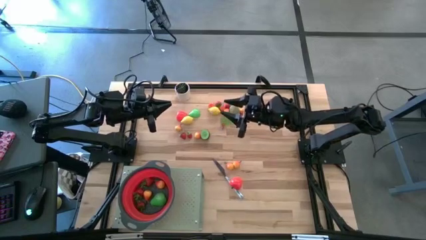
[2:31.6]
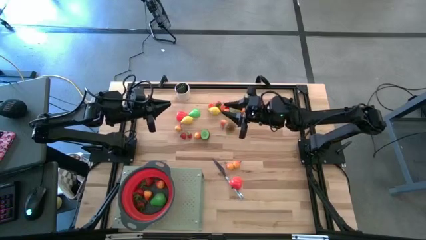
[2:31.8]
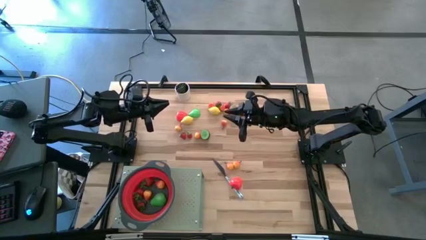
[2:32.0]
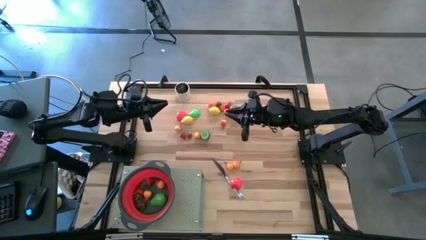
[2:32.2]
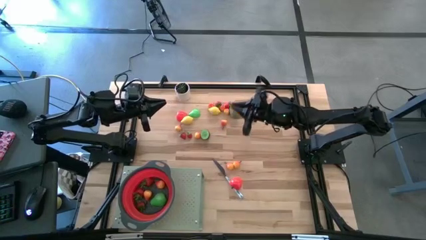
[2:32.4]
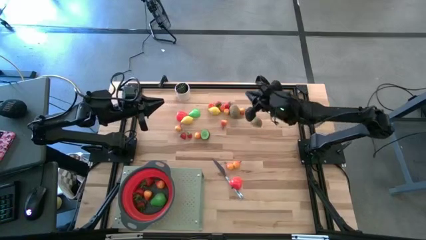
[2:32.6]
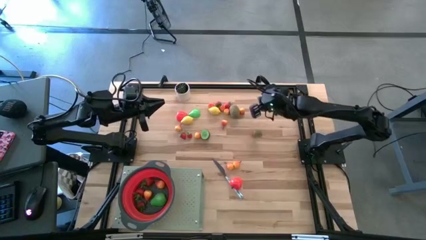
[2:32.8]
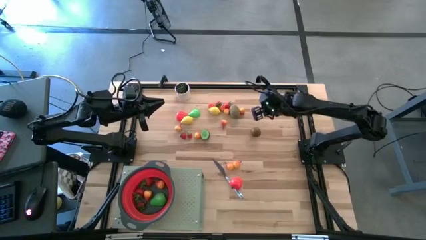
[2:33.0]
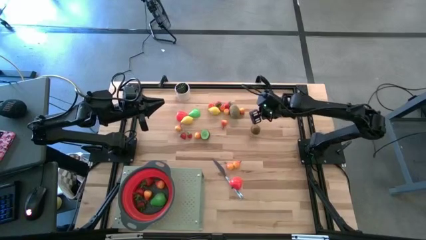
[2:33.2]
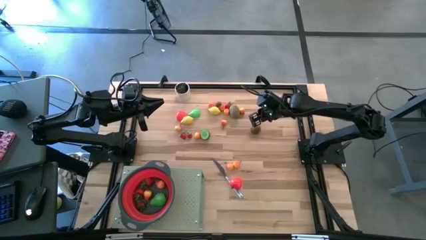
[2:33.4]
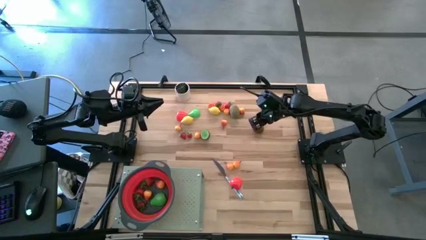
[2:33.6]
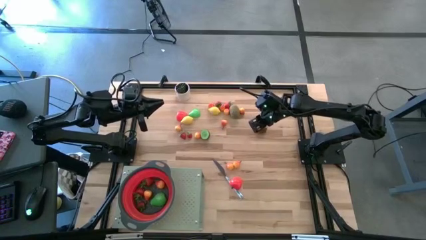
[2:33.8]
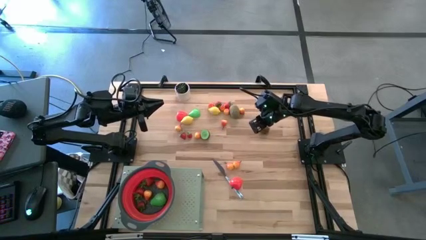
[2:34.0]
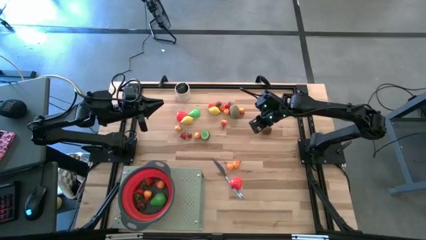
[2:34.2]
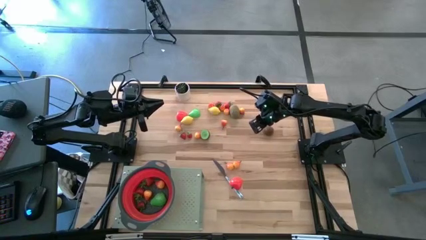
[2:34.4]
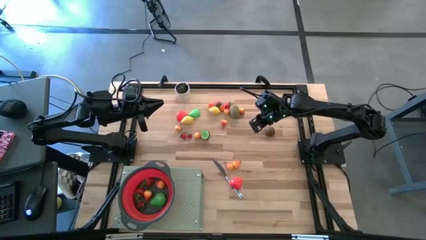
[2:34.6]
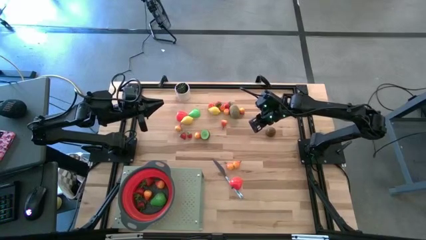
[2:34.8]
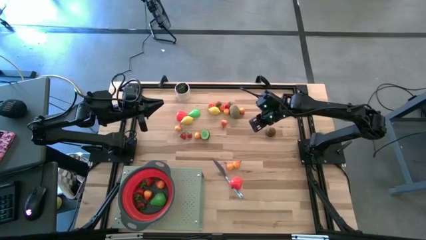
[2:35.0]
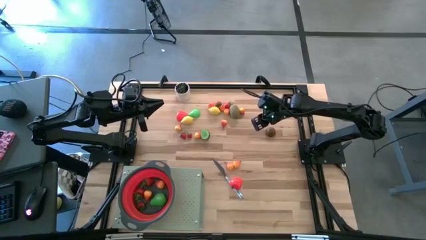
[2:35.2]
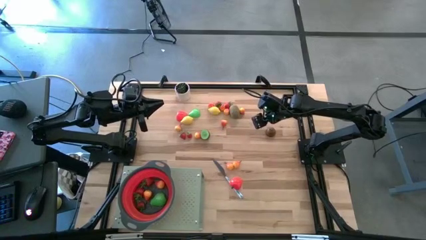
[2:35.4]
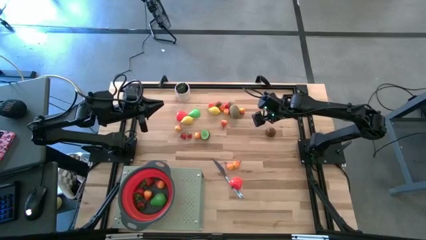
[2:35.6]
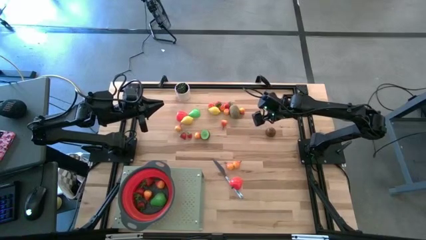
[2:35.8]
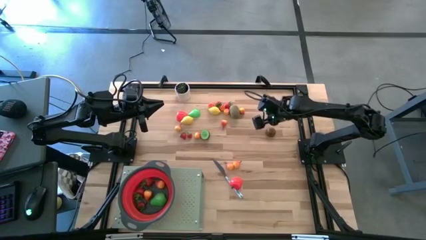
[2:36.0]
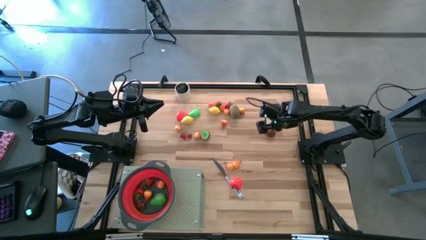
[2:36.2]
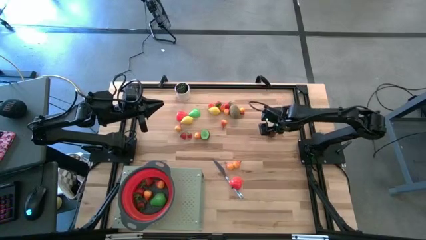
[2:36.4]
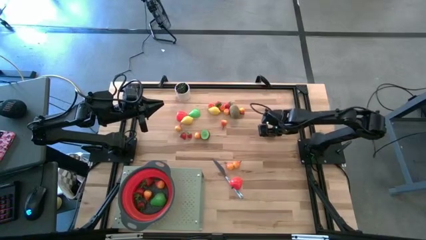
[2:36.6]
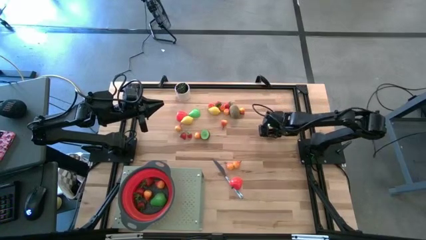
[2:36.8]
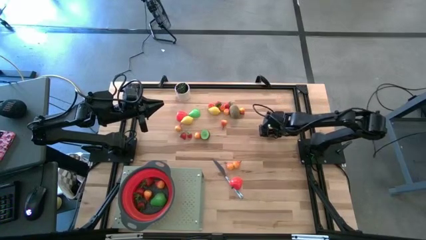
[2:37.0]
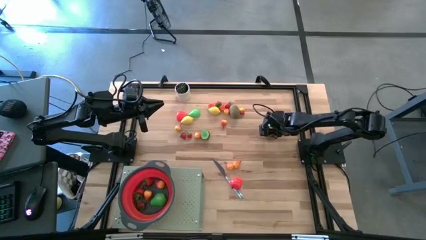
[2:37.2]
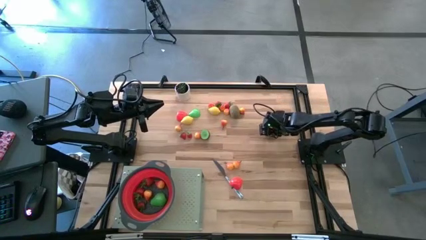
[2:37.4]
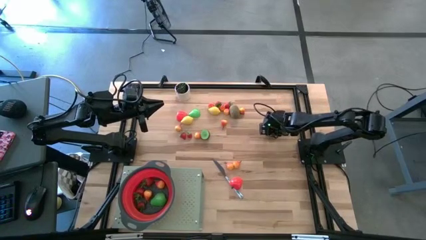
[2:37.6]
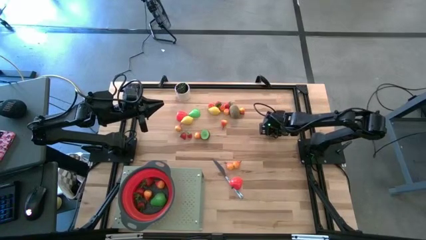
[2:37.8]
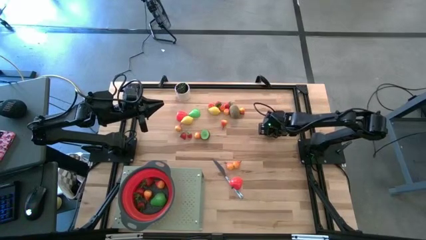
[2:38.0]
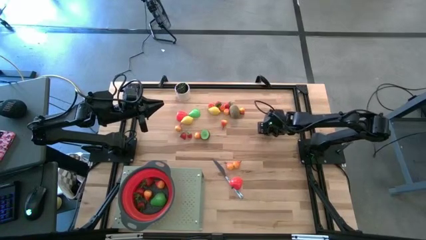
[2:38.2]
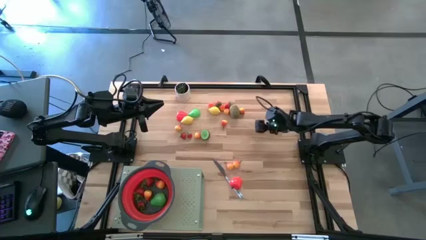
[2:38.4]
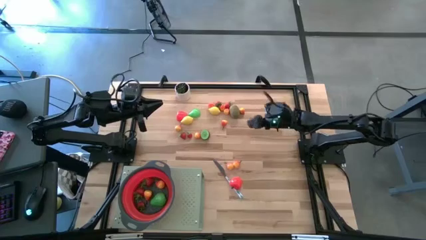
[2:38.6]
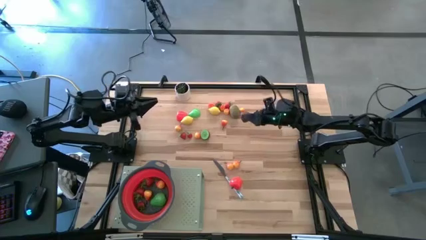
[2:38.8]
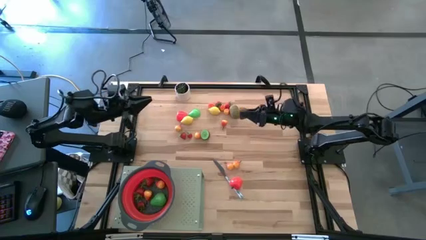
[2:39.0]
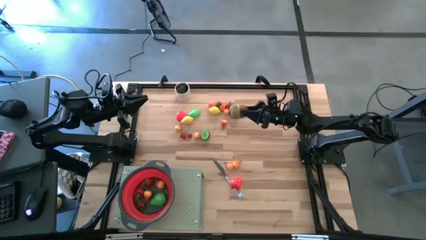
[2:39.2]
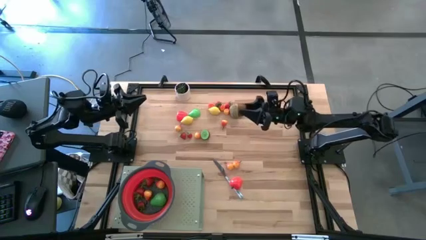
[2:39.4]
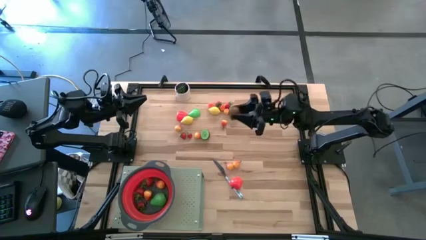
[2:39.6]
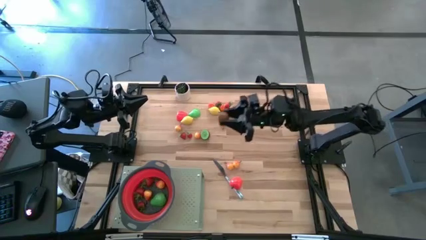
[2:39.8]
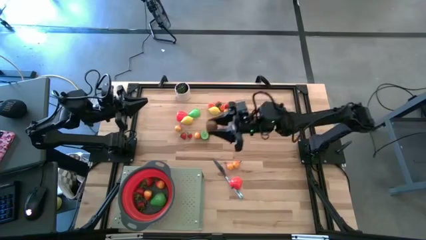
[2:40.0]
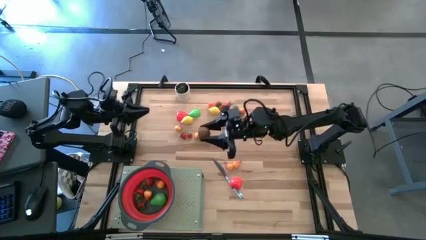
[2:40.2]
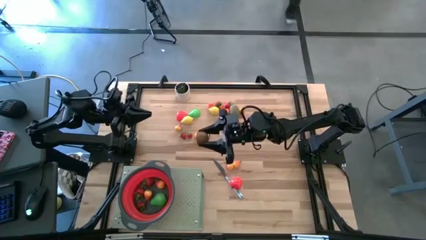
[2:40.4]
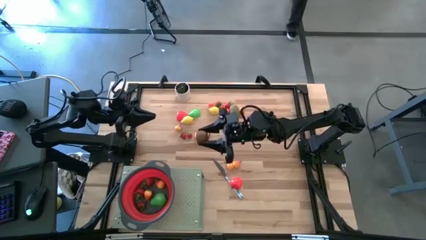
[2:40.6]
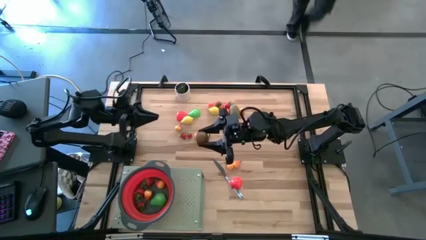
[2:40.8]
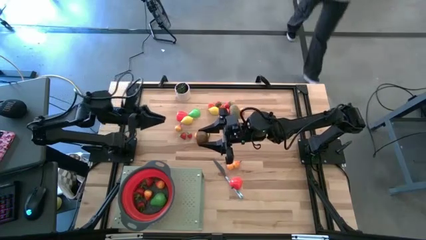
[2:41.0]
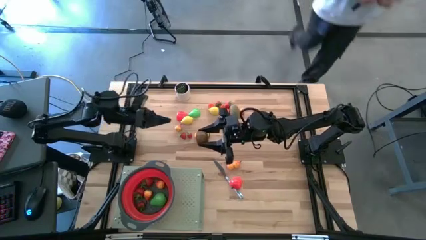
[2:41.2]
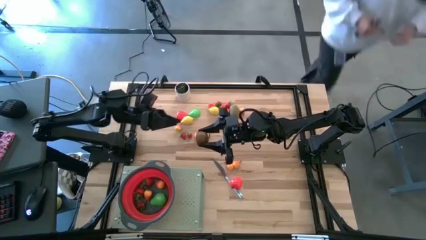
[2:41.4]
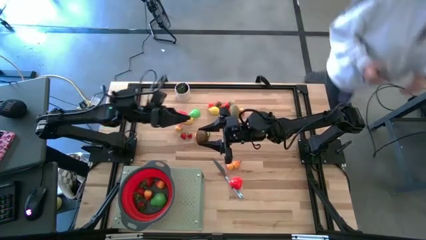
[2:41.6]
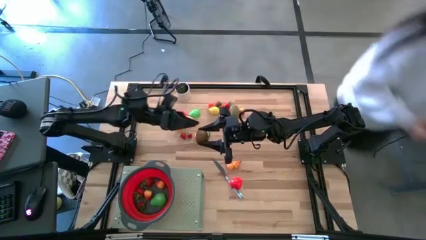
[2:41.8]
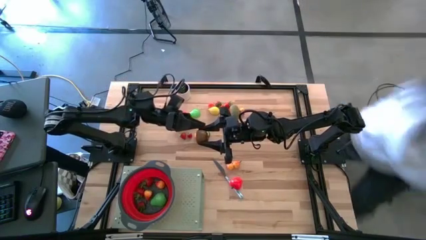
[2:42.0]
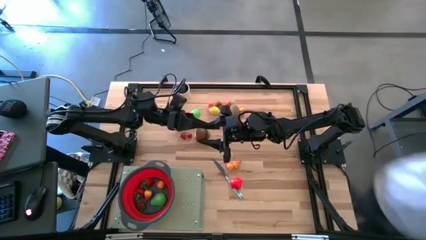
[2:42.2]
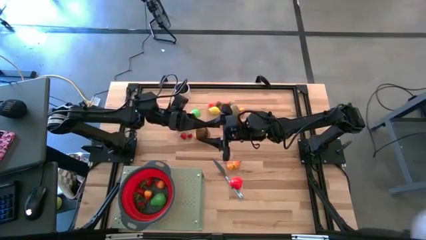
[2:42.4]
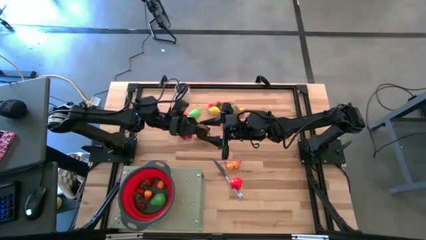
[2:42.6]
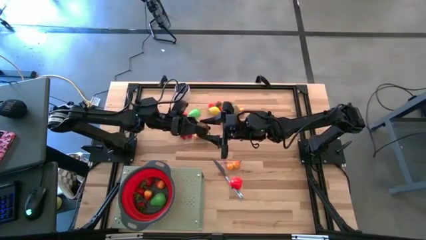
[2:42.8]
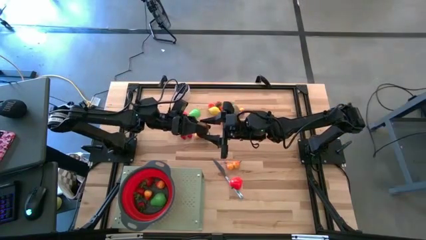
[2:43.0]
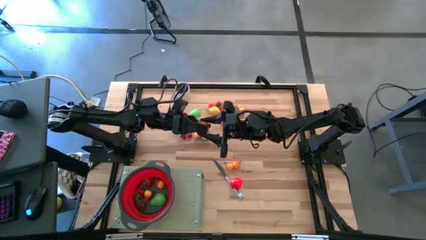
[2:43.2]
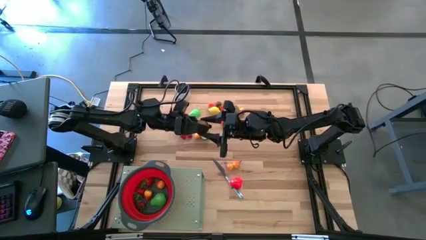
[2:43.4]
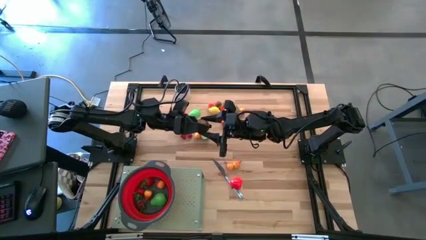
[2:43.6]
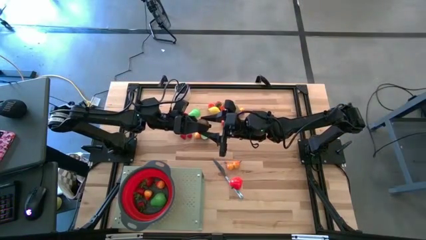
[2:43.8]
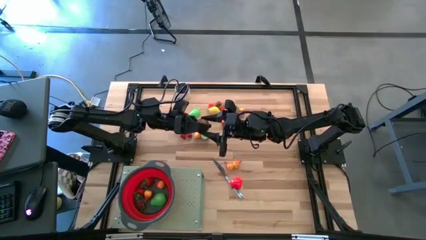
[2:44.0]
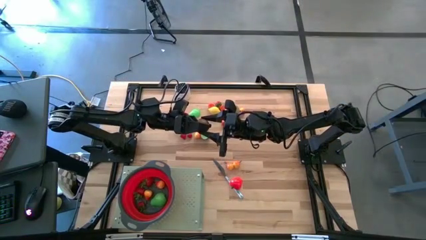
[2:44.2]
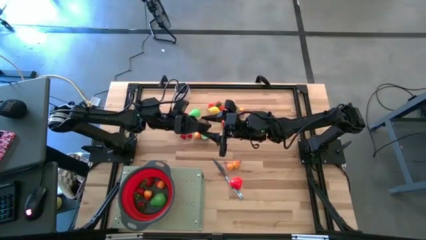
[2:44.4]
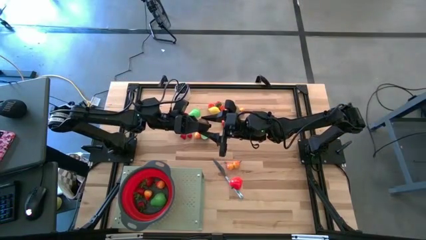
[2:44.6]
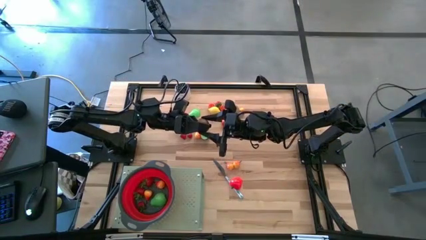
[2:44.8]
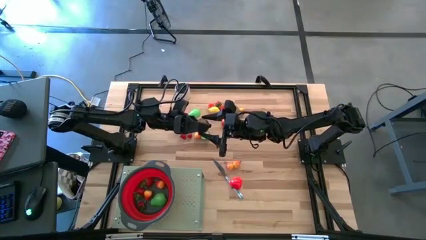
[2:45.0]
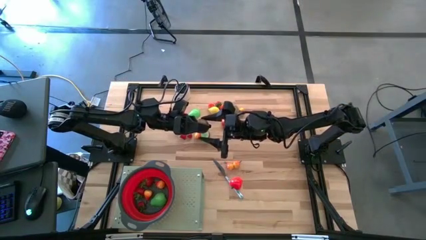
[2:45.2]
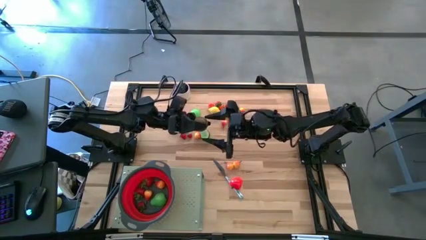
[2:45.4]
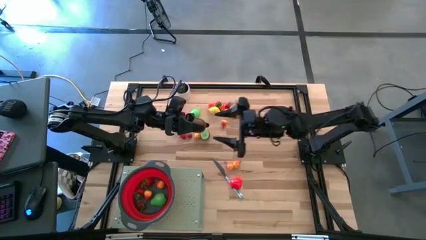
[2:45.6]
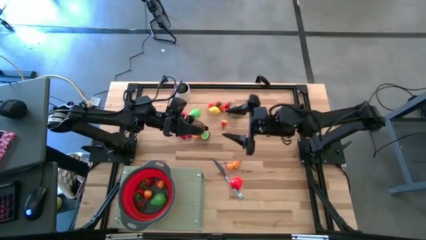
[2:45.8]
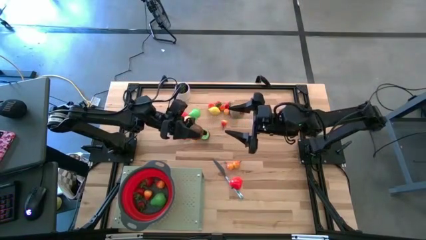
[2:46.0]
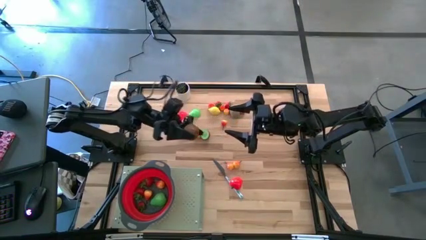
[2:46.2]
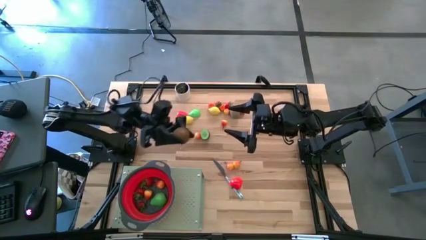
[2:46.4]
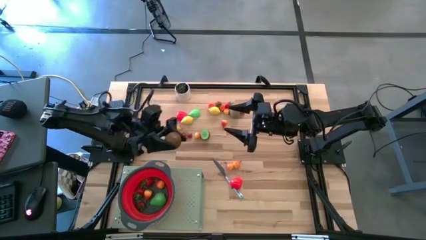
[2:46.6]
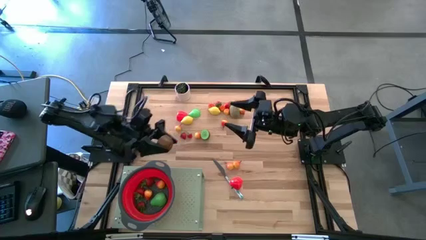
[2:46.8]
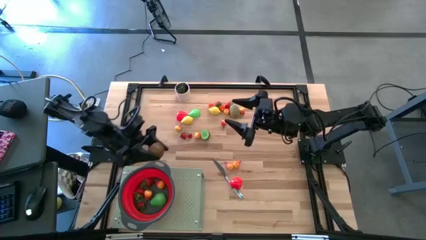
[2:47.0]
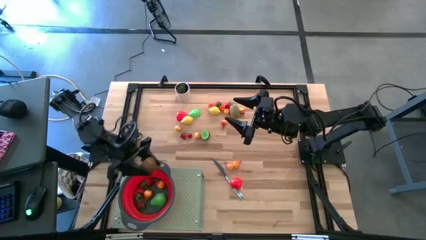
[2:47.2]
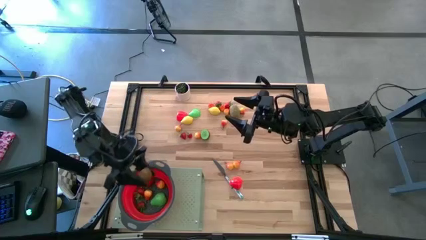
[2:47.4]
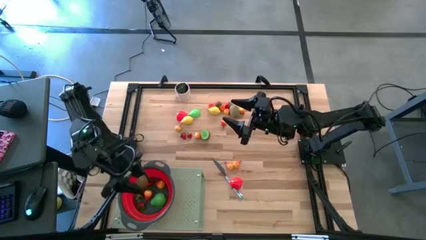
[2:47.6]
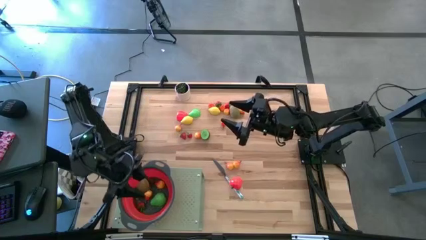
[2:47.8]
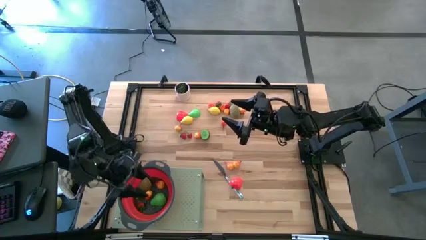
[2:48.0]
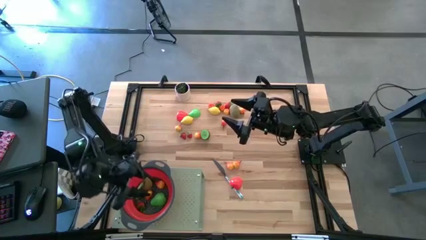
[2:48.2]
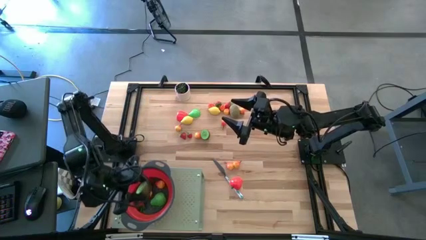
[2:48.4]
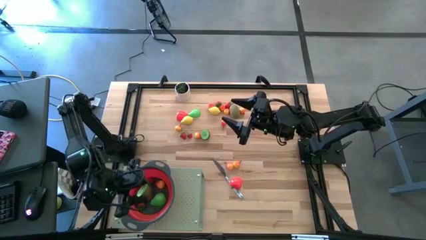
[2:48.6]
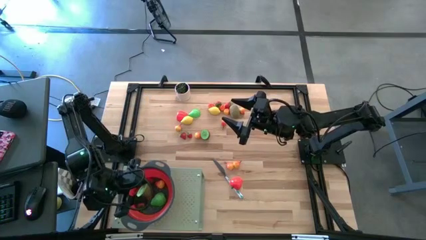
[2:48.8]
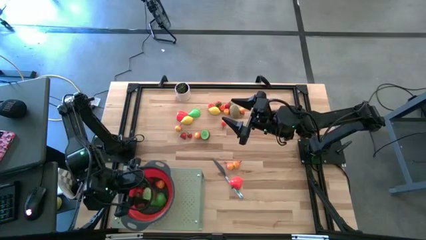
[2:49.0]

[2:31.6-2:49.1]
Task: Pick & Place Fruit
Put the half kiwi into the red strainer bowl on the shelf
